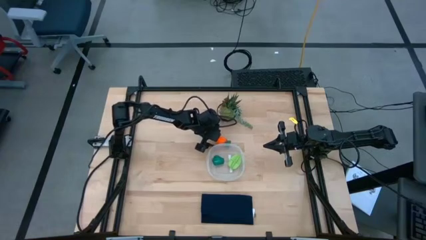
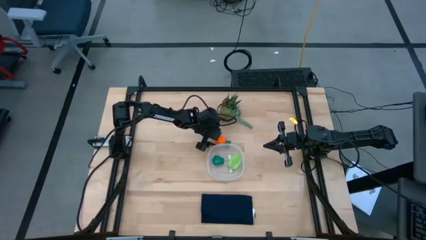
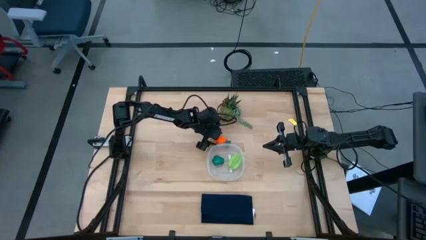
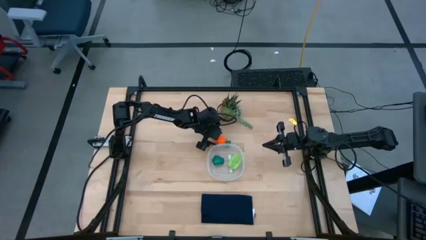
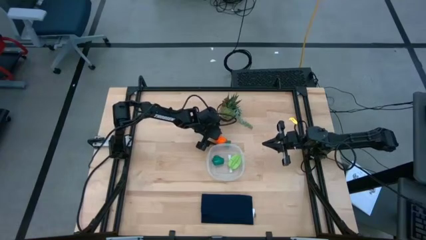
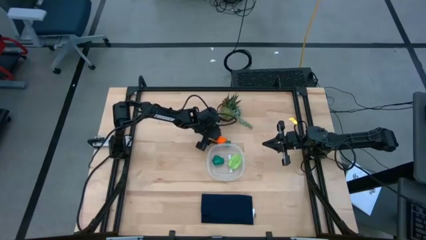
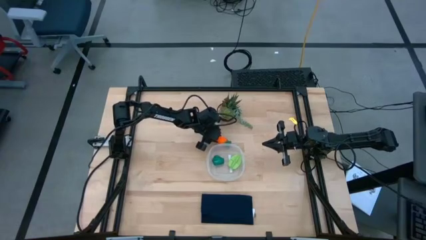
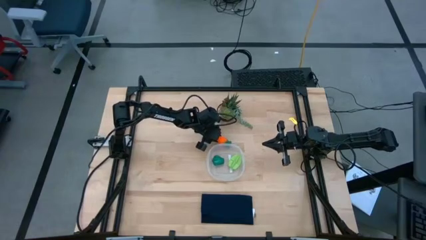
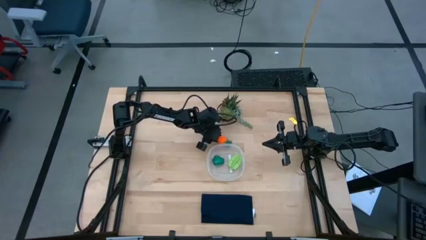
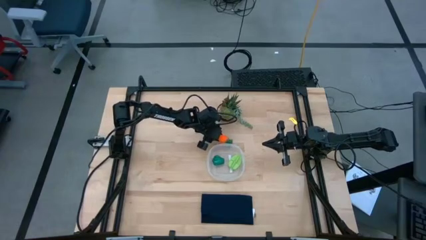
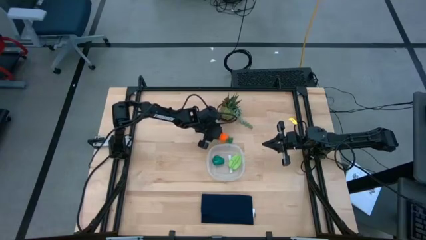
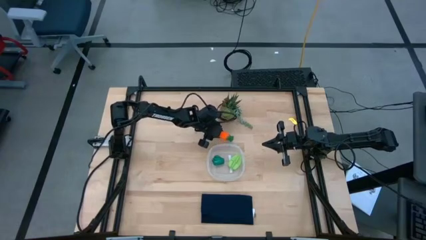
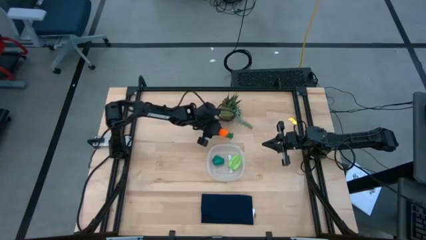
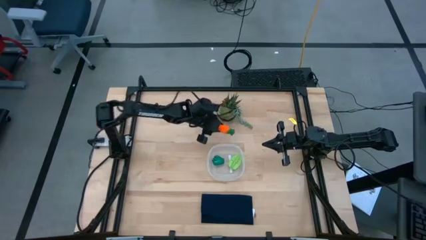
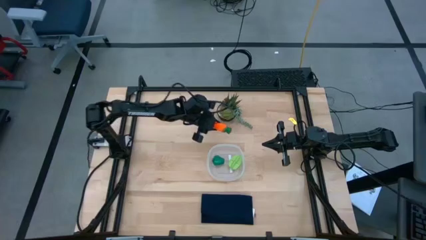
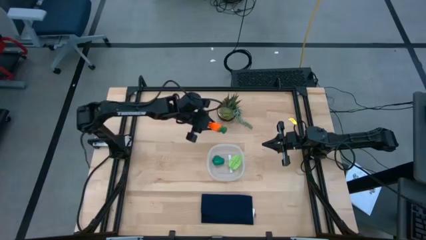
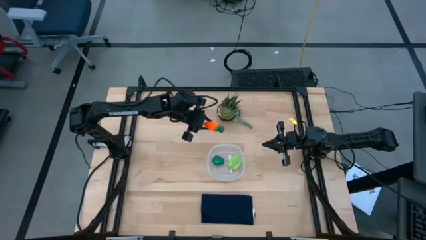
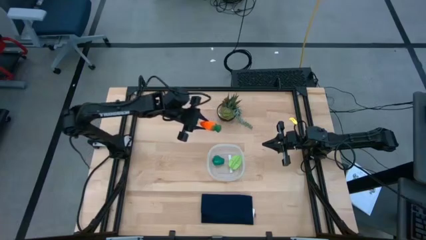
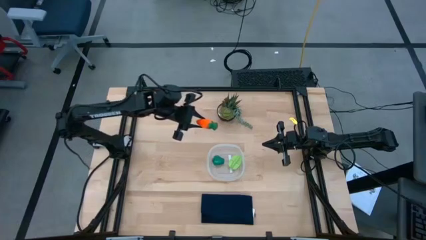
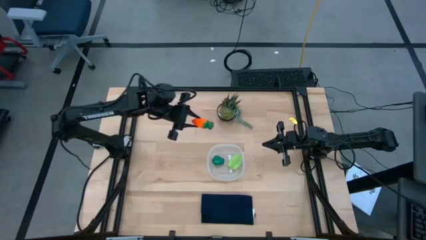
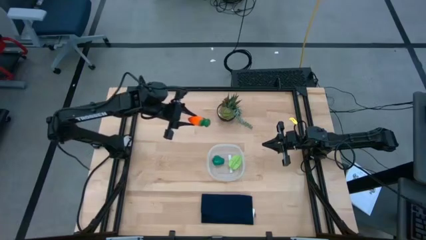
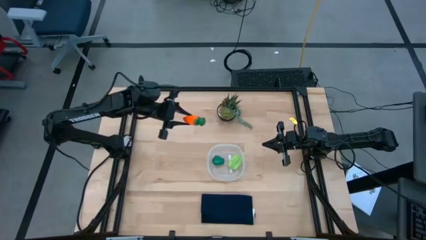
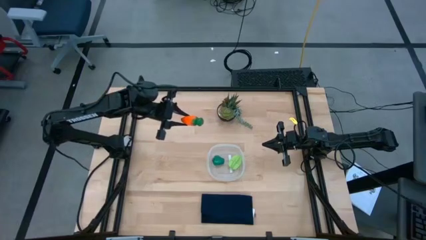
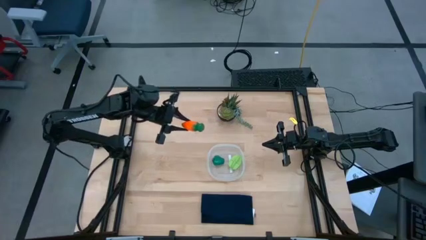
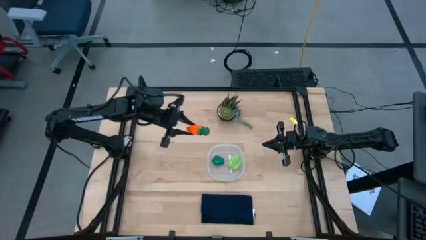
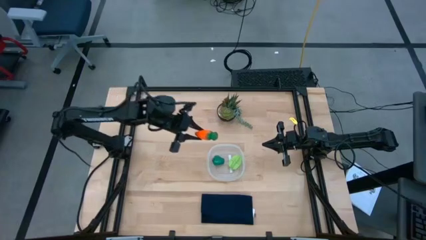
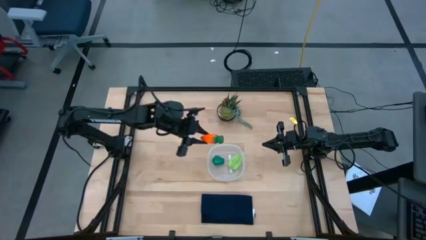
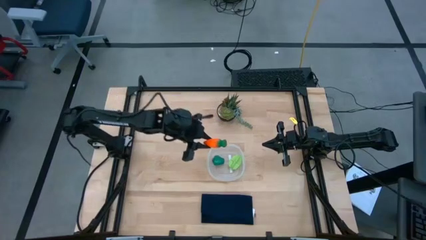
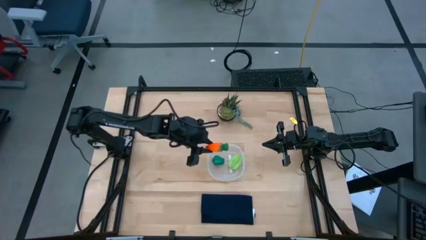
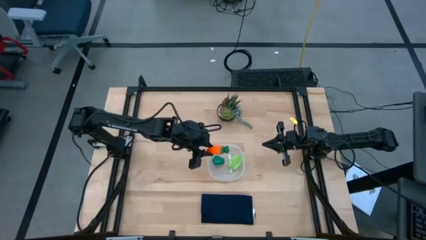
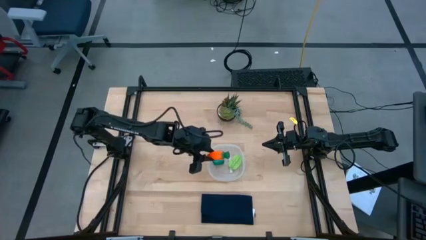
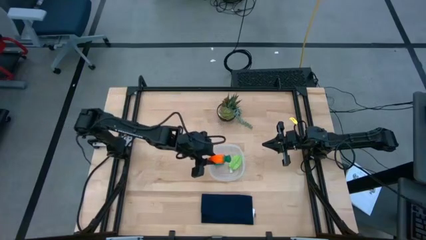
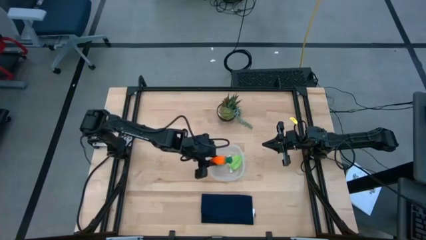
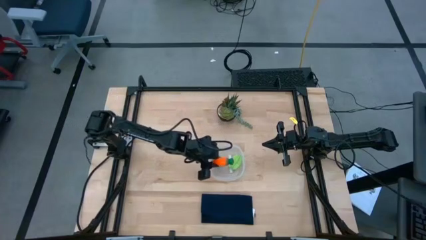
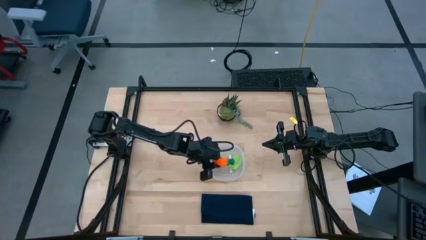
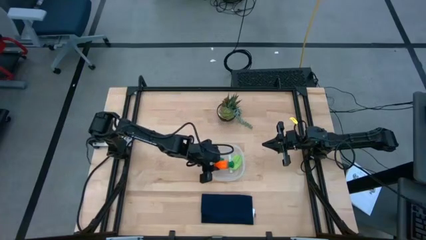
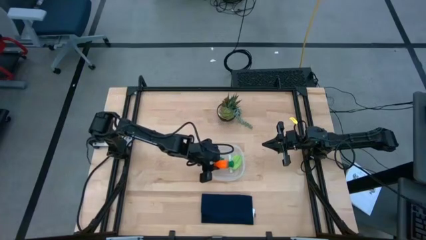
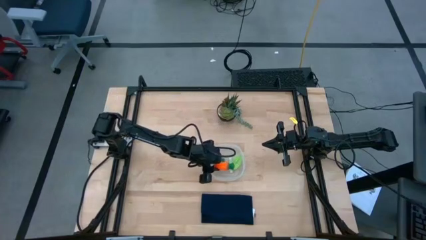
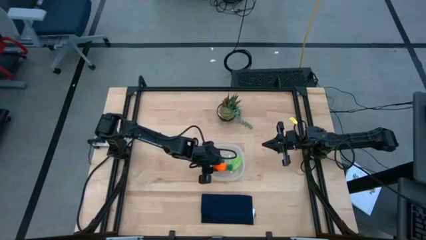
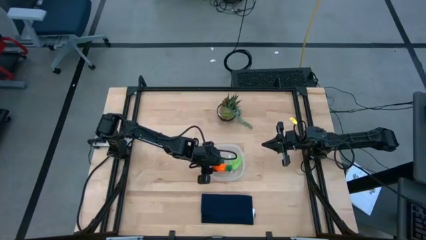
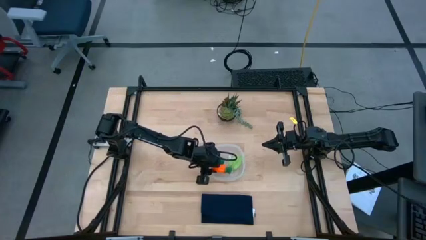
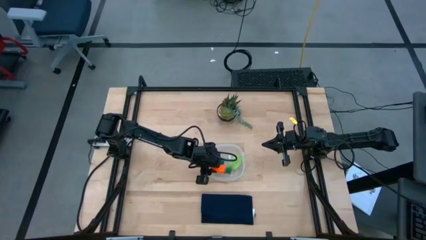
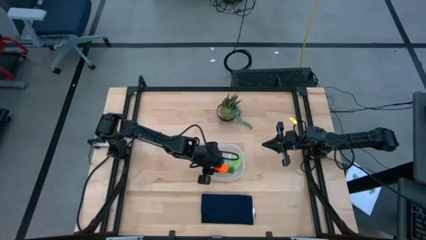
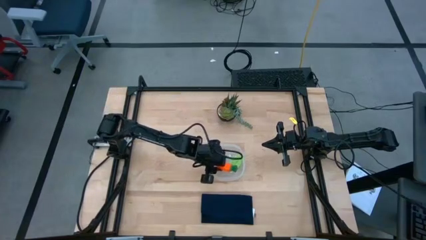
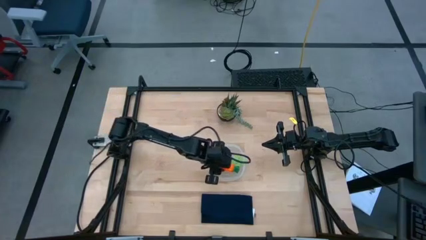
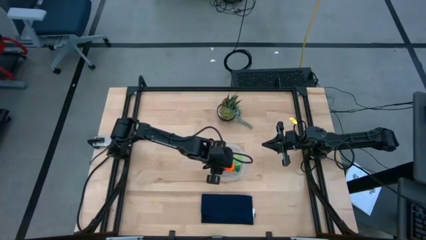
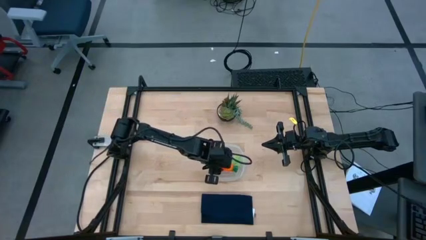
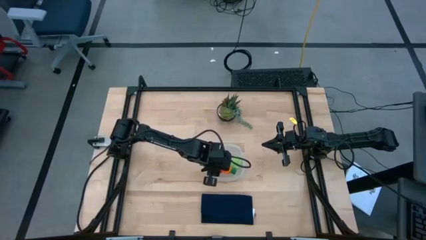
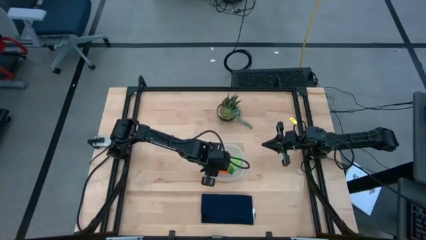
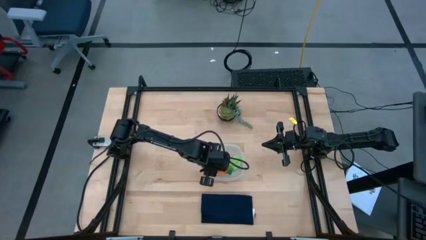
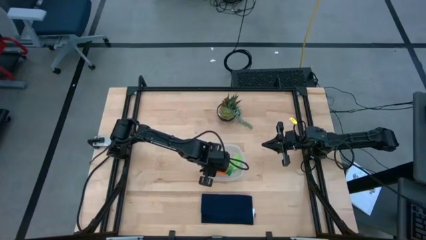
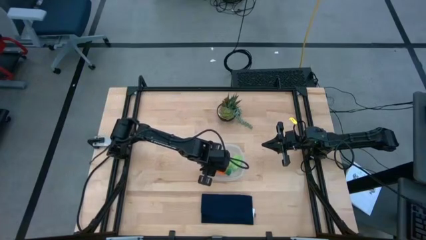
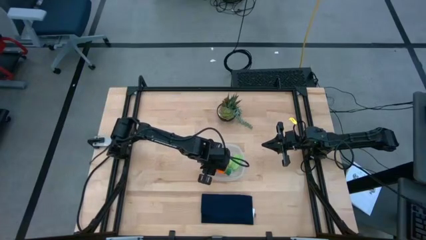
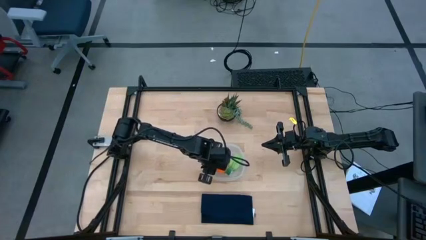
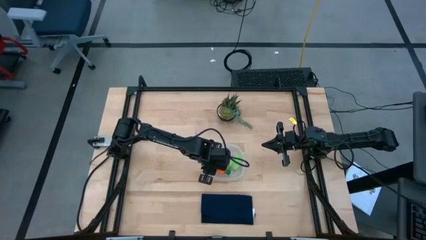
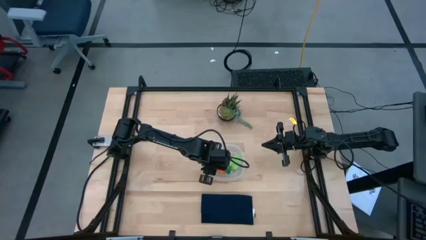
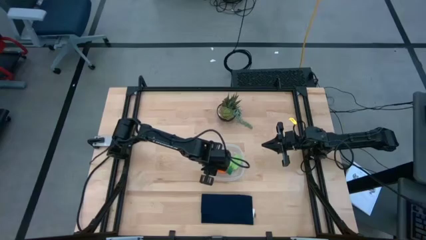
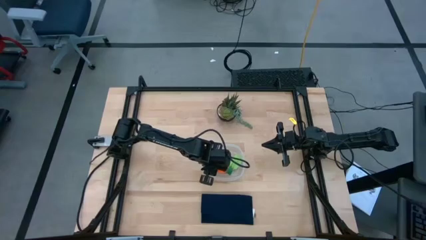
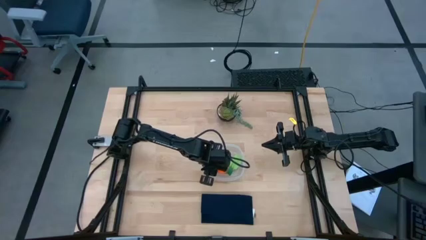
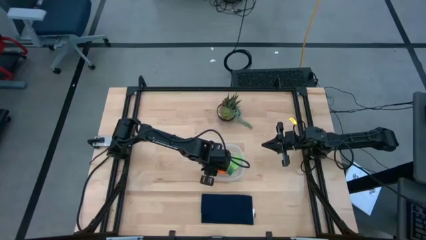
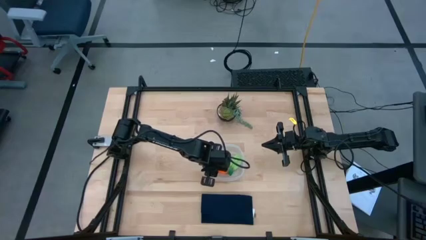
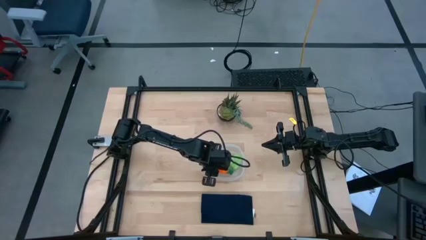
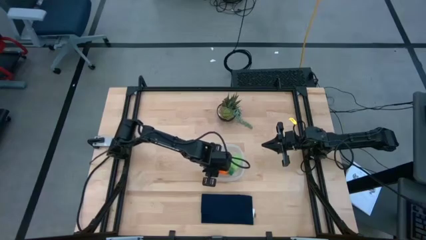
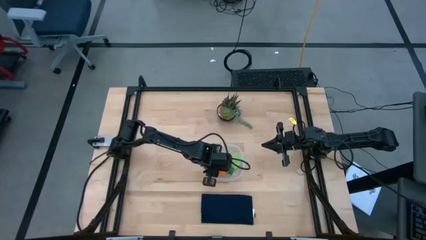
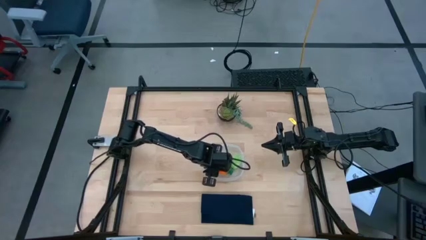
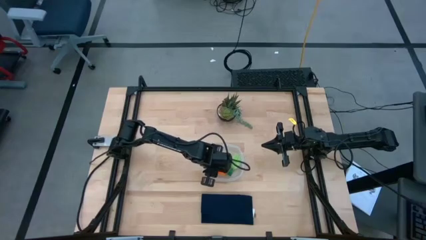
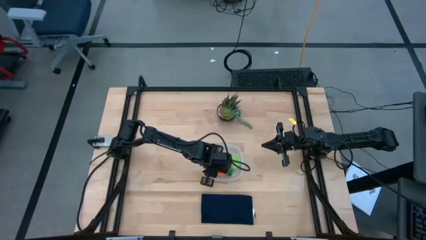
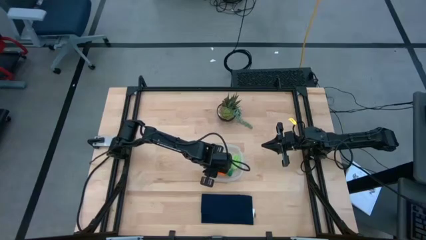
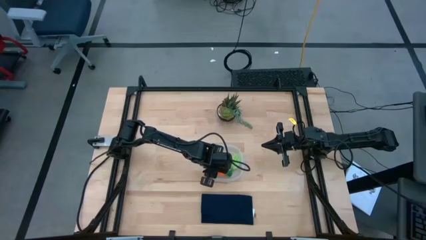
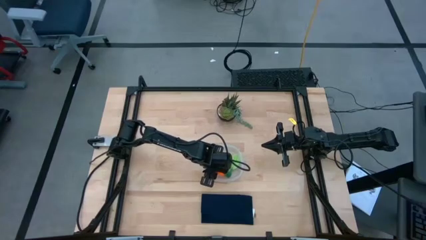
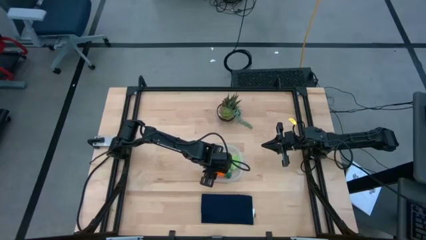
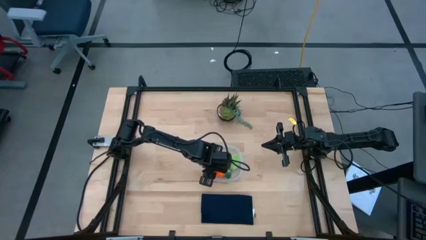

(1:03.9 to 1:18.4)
Task: Pick and placing Produce into tupperware
Put the carrot into the transparent bin
